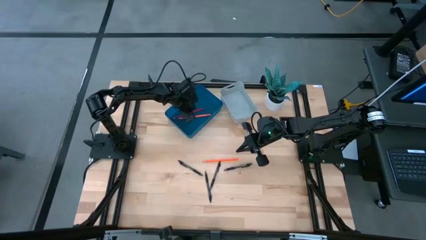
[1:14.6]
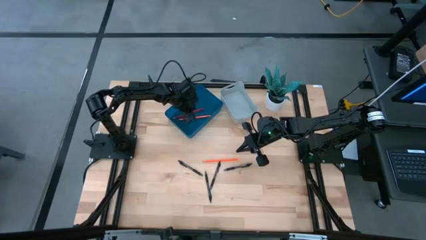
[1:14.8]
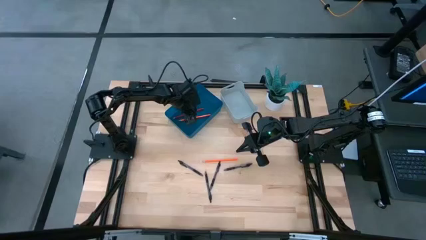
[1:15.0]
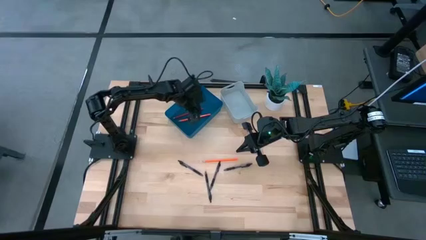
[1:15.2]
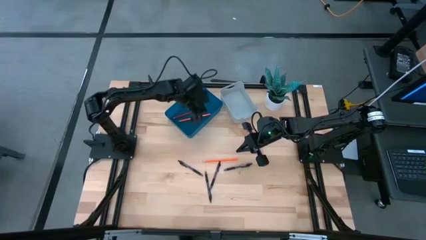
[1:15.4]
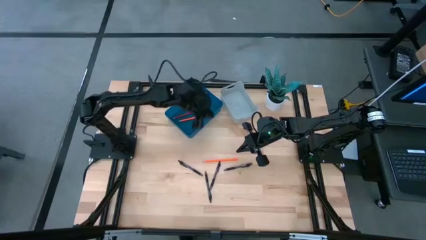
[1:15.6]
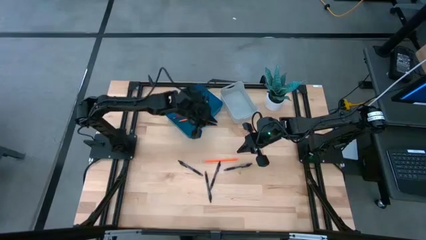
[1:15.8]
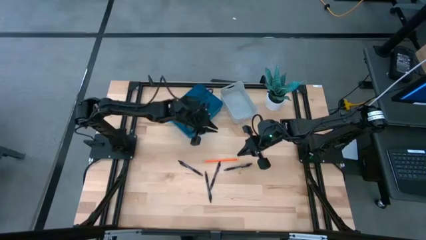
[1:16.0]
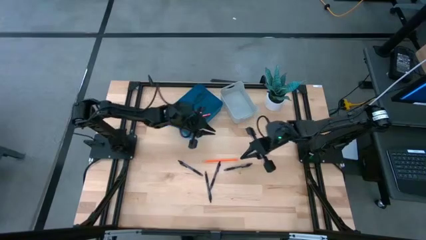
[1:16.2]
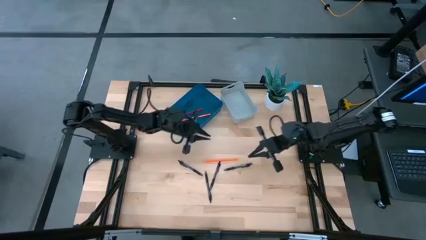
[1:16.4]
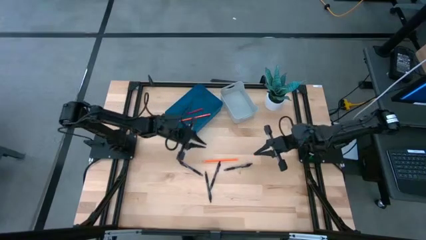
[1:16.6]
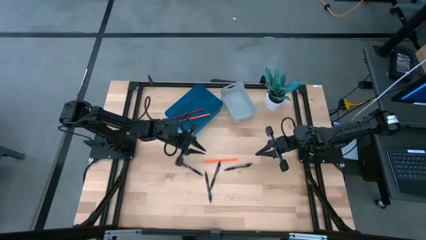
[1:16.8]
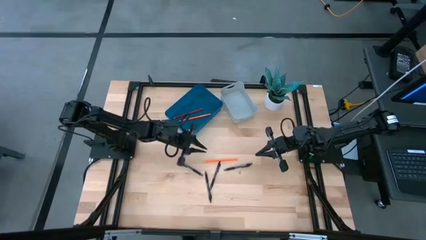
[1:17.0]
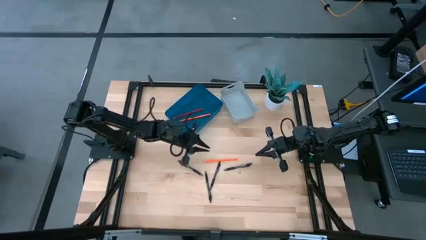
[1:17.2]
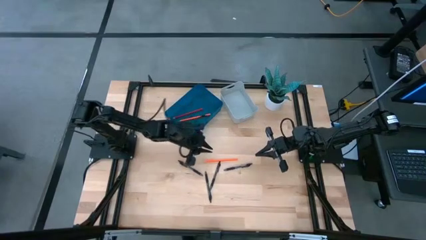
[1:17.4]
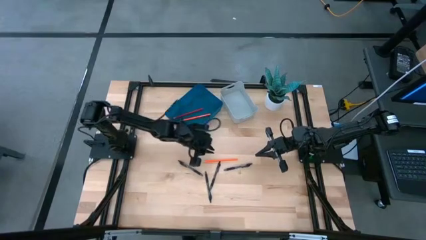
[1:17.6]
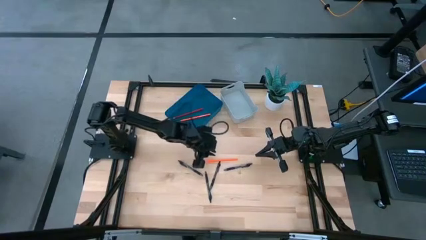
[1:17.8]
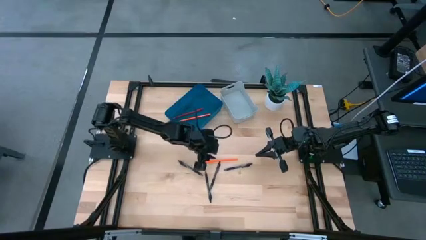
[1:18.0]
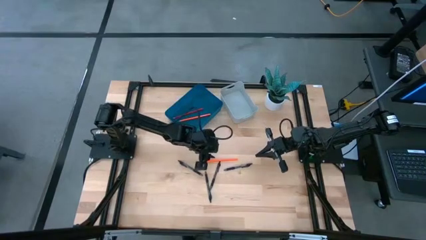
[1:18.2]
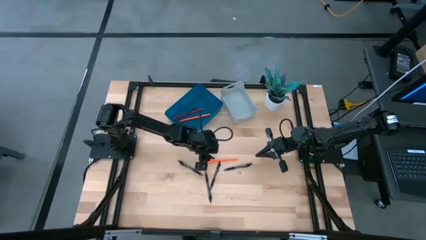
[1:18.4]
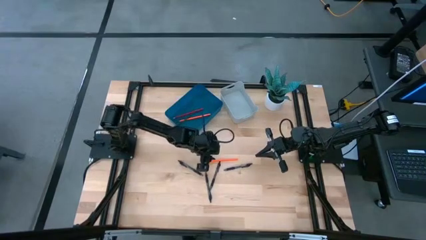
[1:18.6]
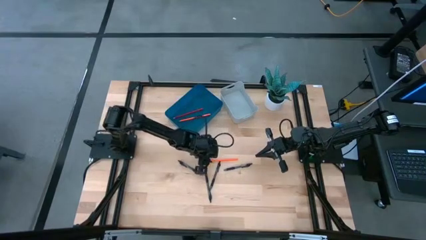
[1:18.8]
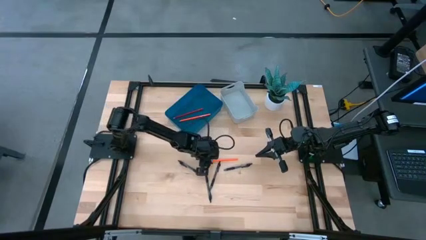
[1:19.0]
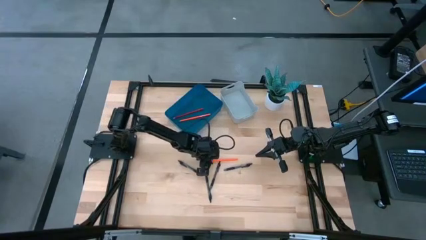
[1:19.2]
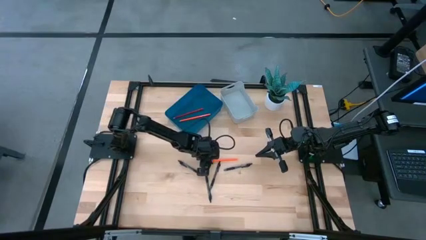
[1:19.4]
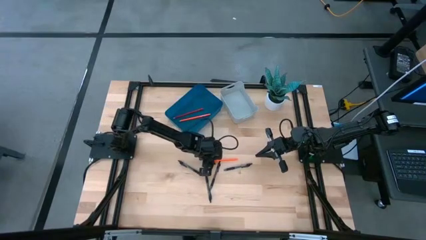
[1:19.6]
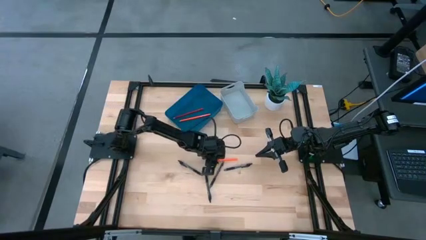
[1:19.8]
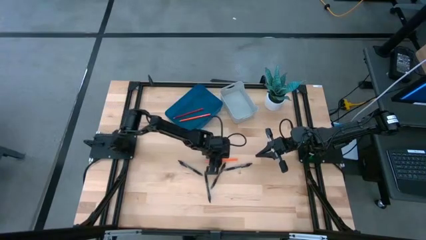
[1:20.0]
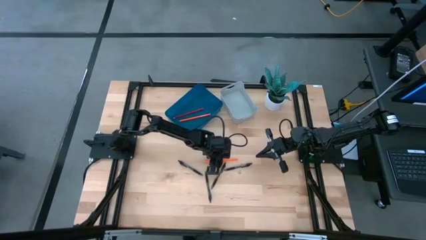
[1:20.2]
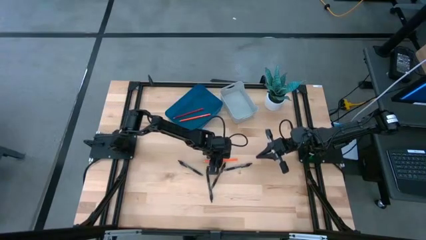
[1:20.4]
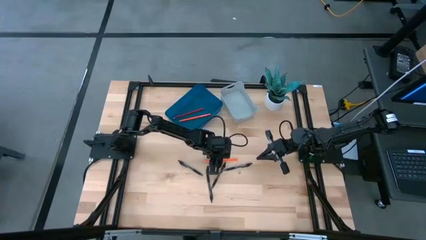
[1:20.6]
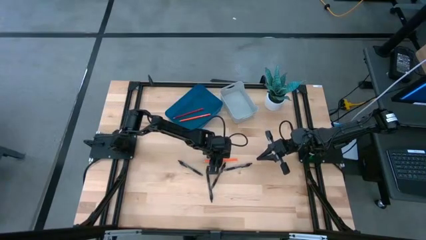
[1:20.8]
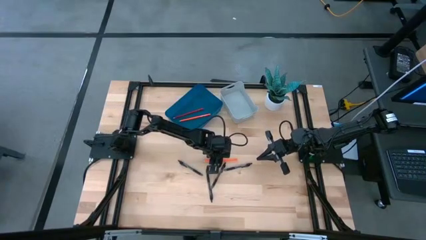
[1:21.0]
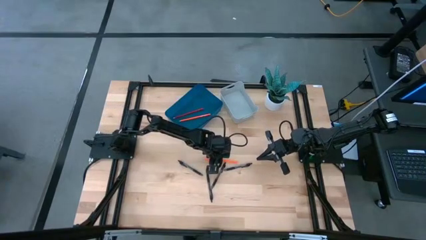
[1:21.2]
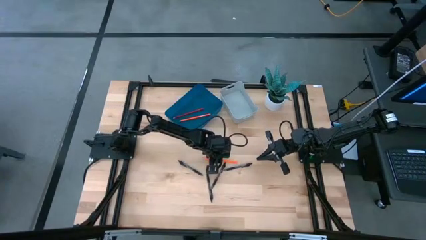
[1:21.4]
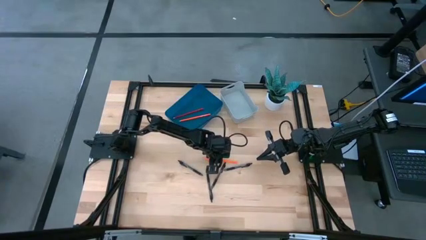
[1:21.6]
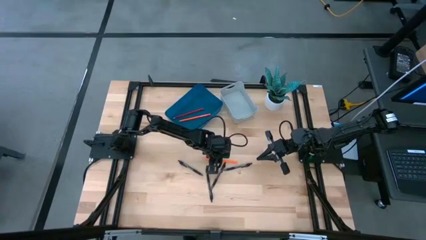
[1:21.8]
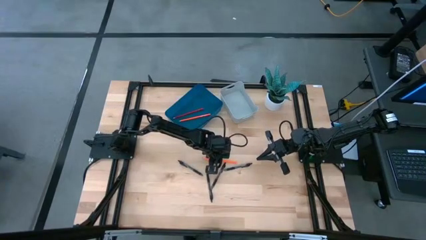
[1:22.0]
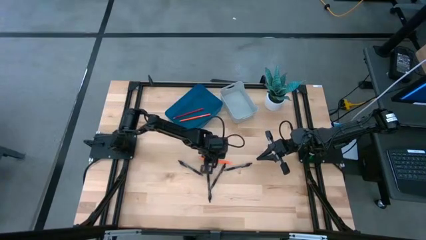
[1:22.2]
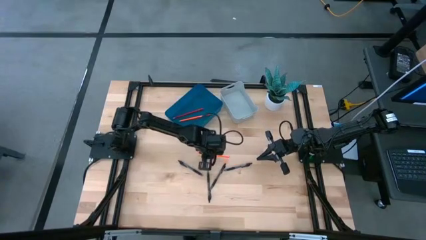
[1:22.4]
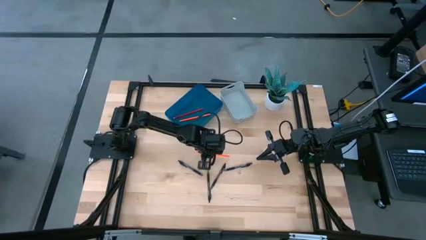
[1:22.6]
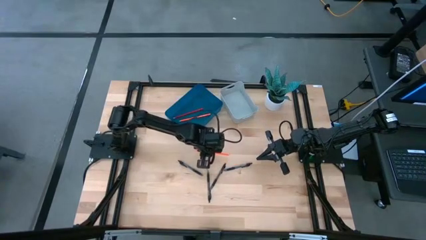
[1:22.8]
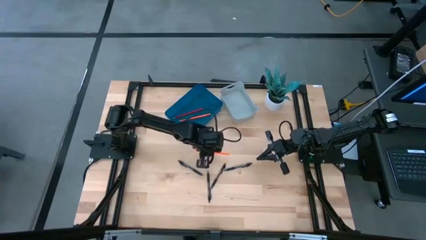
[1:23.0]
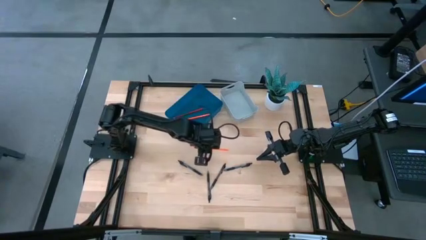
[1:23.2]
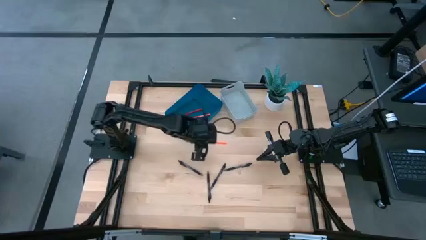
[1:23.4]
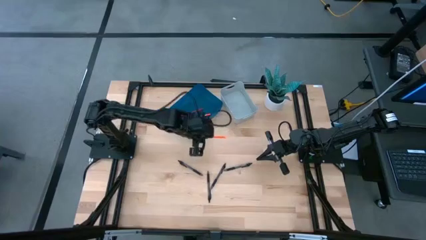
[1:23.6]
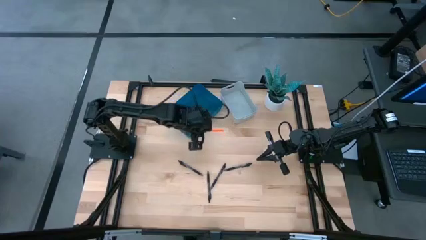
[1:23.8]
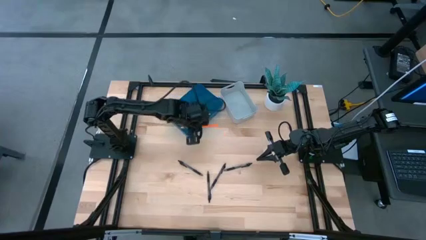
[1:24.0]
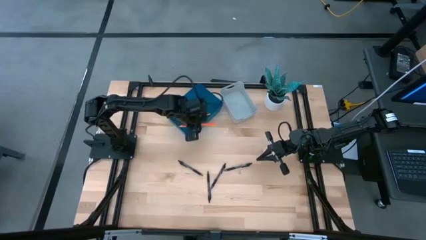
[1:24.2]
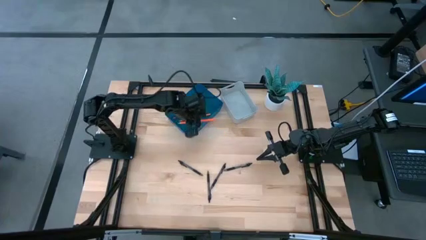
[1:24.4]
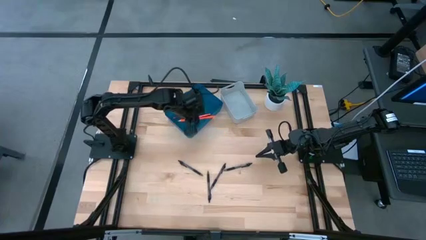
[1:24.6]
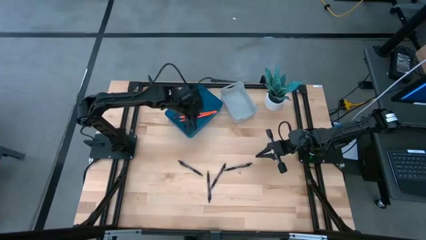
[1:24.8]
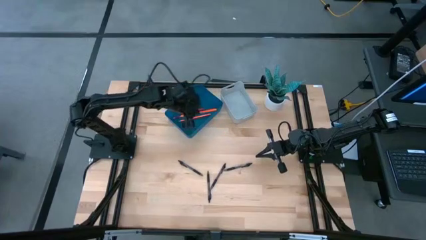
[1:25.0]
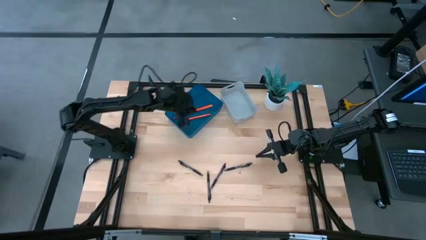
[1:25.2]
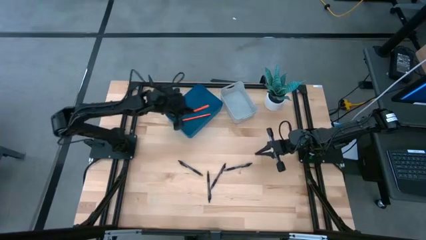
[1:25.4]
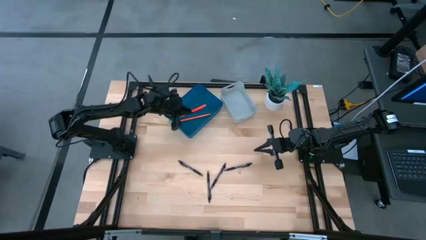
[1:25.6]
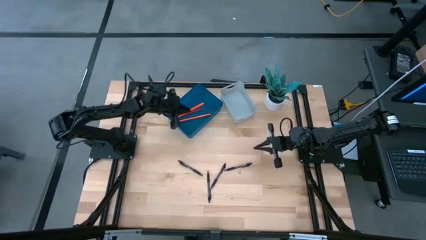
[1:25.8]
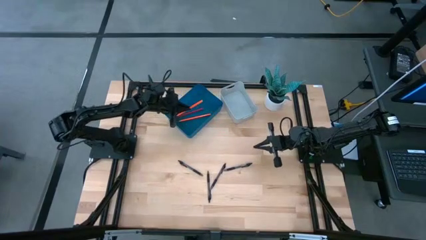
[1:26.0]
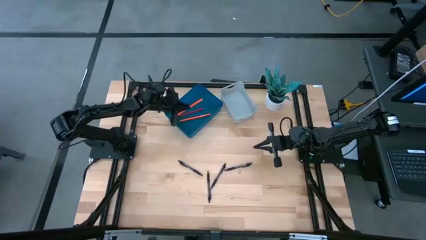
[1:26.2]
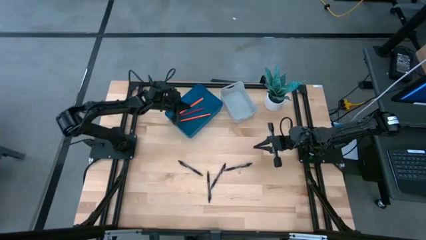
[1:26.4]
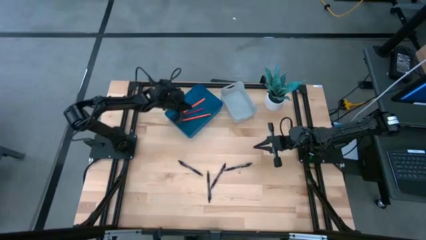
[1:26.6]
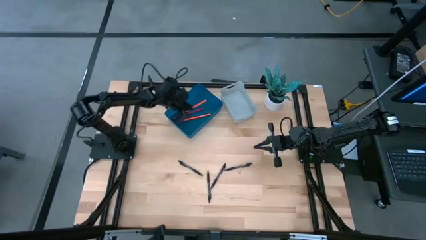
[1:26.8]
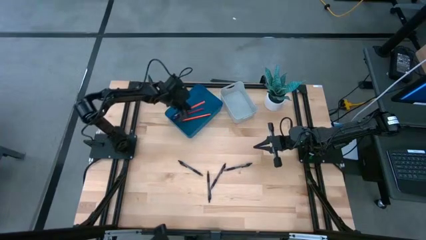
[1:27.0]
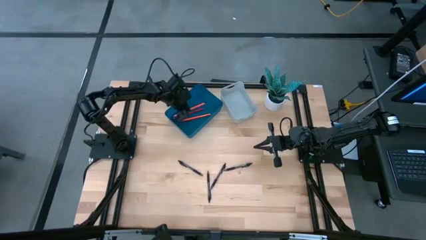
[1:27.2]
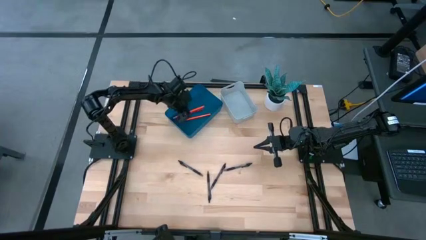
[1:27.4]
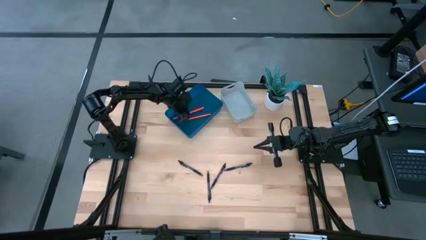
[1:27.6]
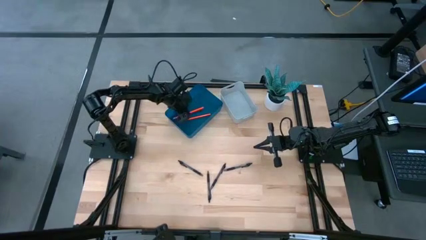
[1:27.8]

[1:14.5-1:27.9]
Task: Sort pens & pencils
Put the orange pencil into the blue bin

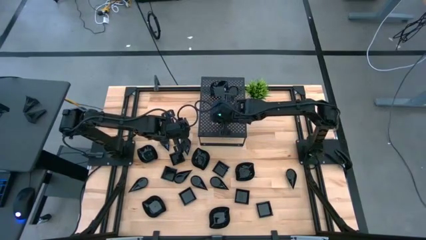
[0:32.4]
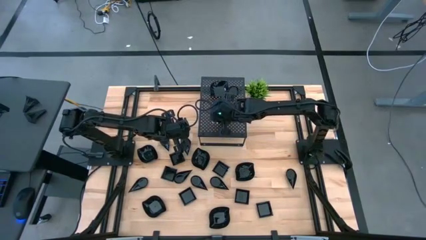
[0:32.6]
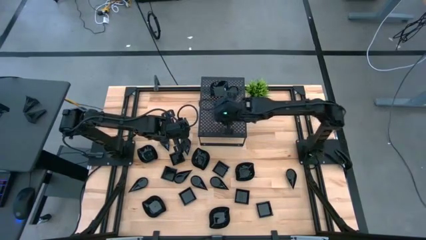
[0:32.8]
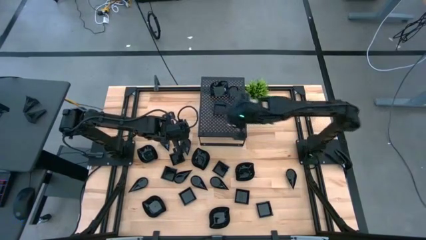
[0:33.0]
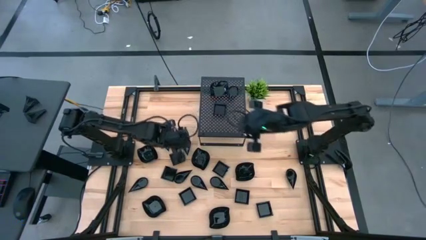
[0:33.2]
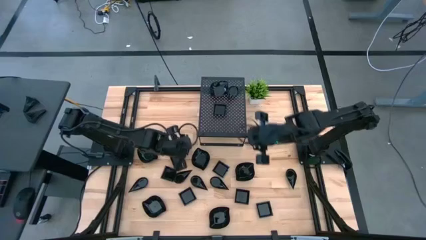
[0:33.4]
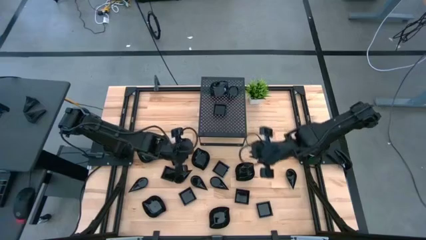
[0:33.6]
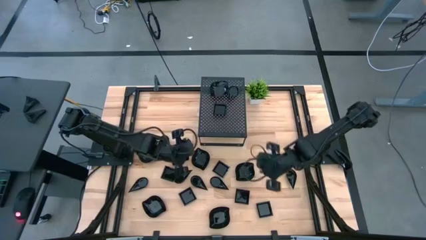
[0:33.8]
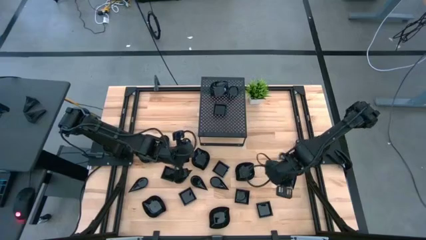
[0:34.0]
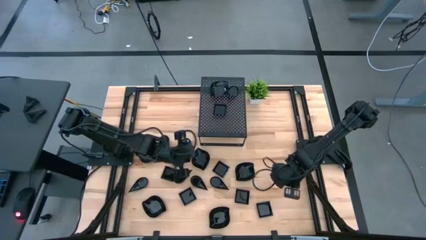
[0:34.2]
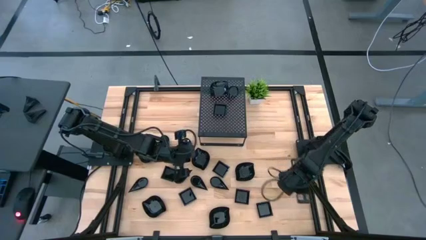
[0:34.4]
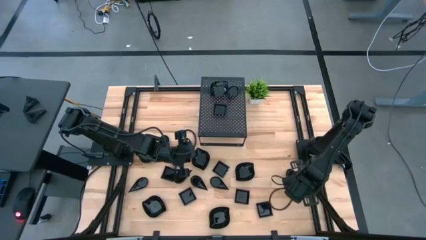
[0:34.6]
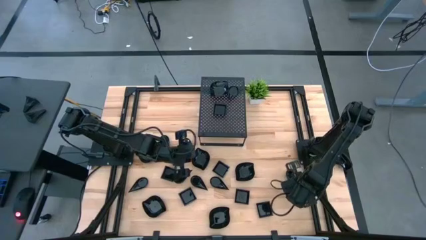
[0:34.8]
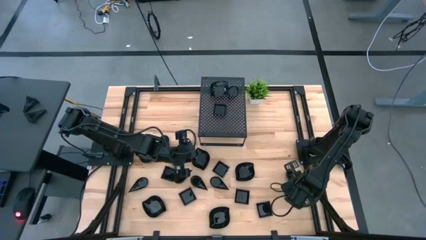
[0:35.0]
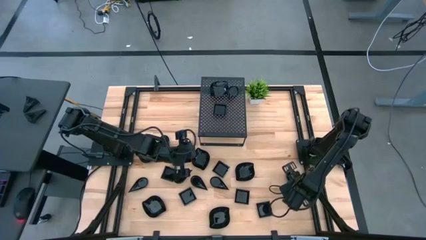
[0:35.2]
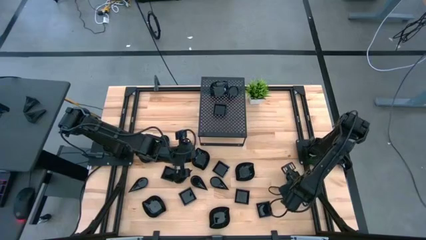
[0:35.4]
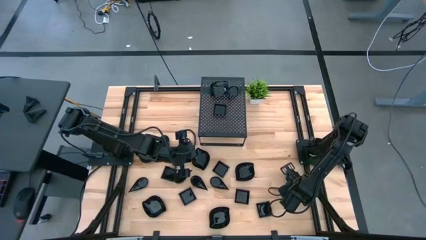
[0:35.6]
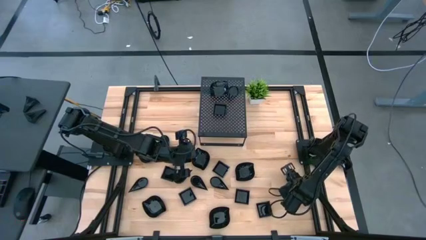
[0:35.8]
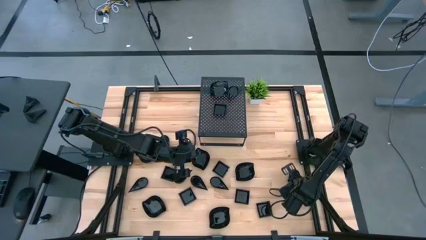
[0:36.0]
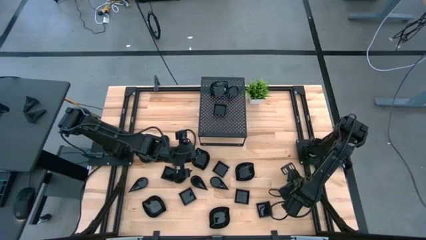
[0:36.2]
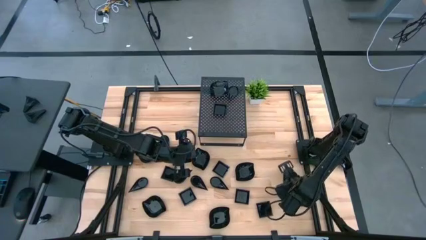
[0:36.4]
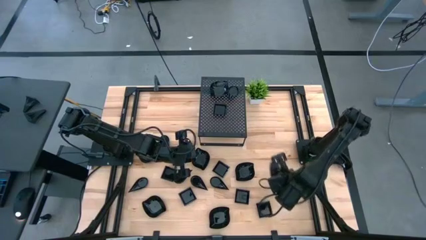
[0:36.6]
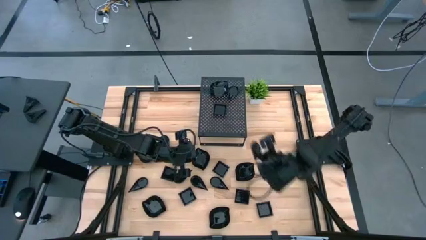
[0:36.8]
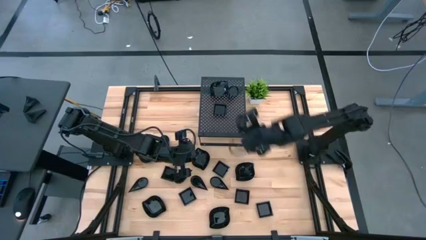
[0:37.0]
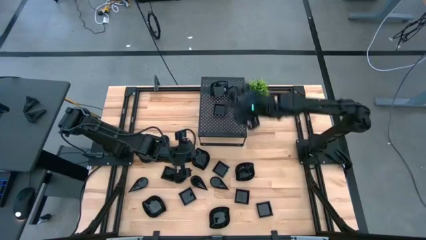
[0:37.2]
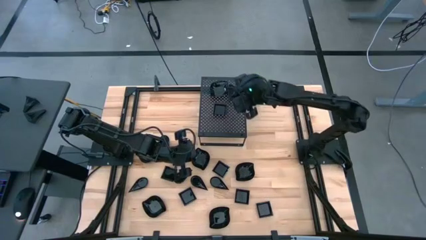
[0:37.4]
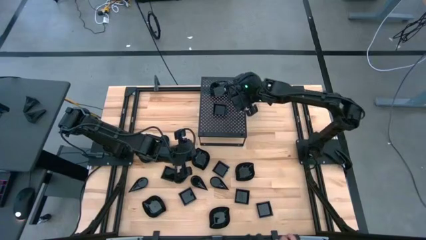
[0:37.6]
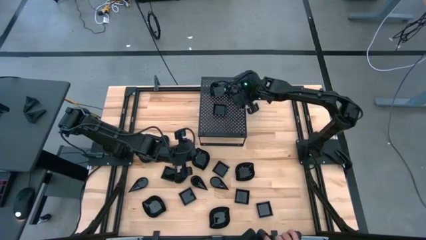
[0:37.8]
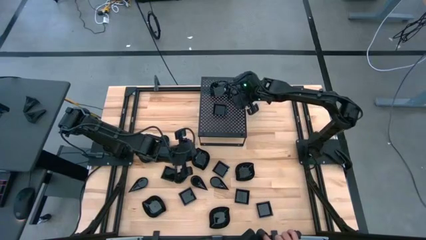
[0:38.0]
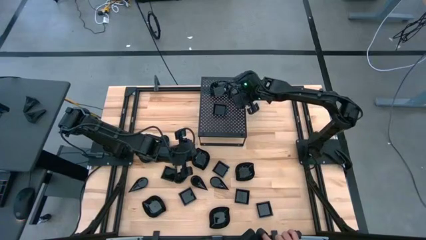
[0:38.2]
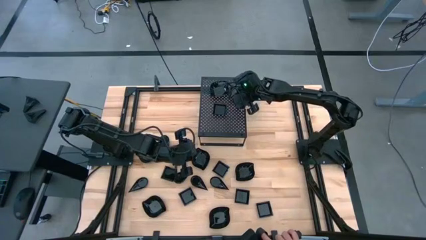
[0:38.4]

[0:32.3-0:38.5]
Task: Pick & Place Mini shaped plates
Stack the black drop-shaped plate on top of the black drop-shaped plate on the shelf
